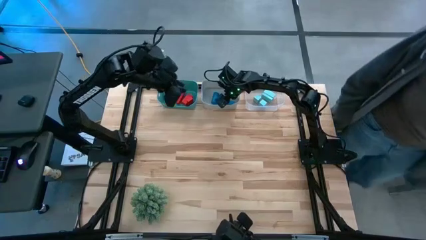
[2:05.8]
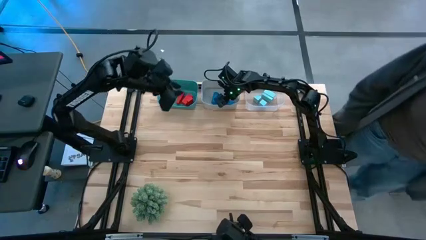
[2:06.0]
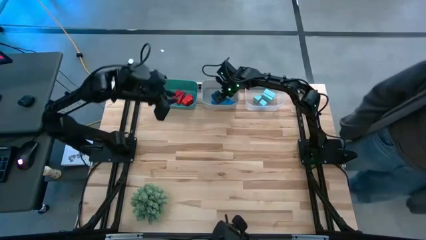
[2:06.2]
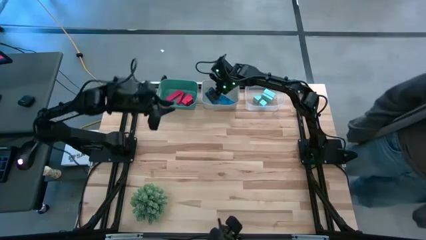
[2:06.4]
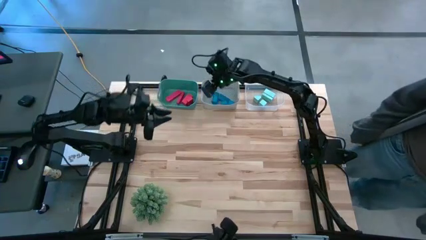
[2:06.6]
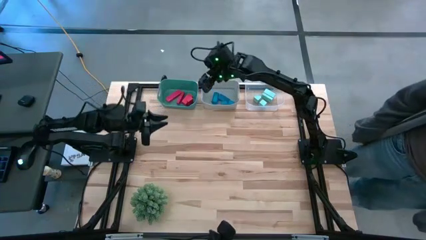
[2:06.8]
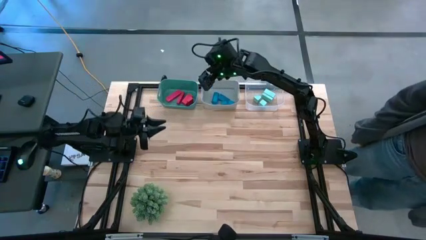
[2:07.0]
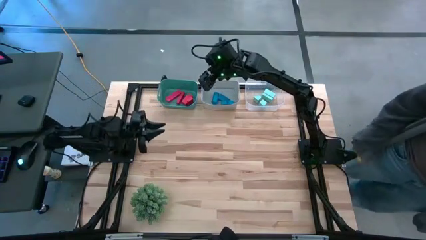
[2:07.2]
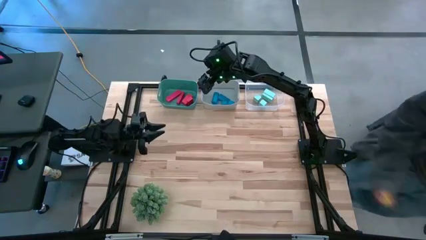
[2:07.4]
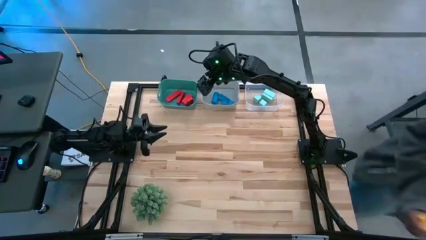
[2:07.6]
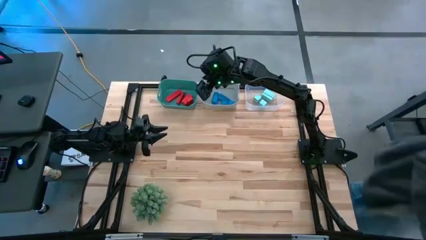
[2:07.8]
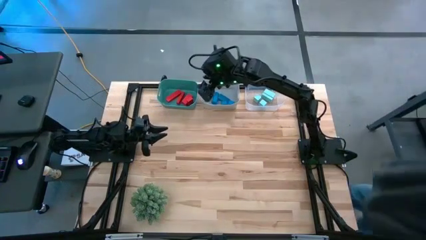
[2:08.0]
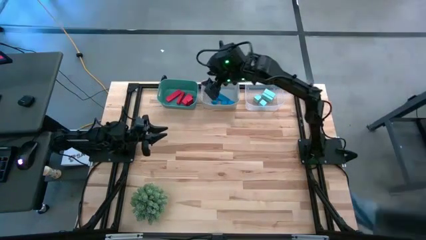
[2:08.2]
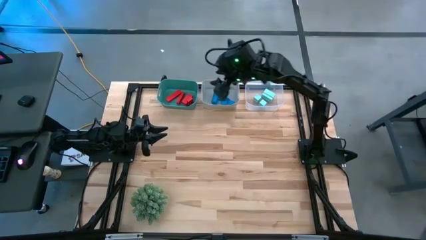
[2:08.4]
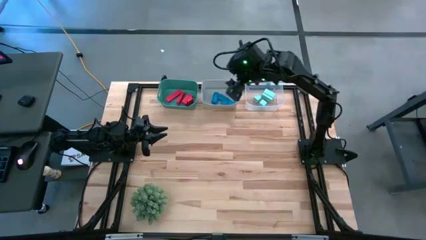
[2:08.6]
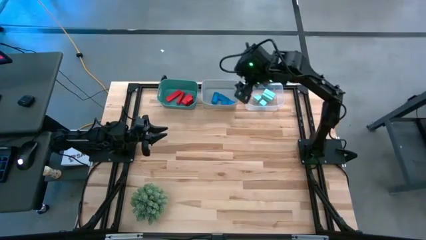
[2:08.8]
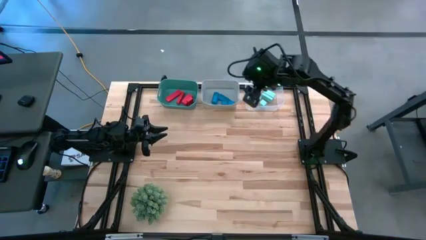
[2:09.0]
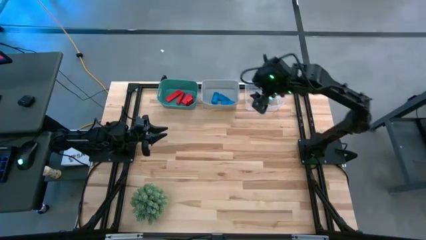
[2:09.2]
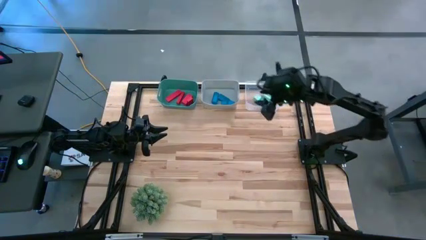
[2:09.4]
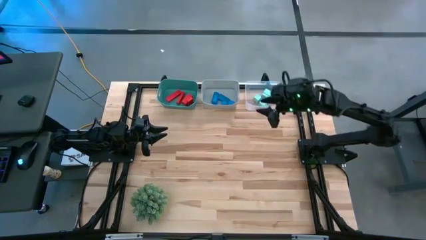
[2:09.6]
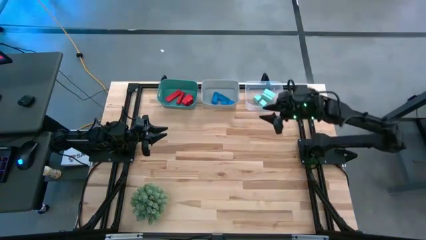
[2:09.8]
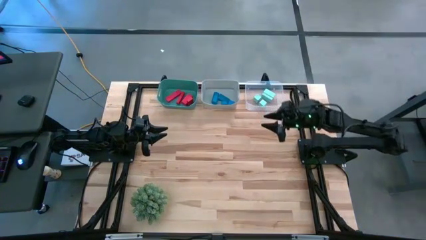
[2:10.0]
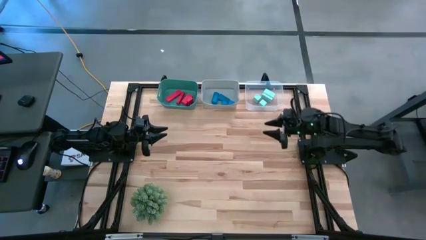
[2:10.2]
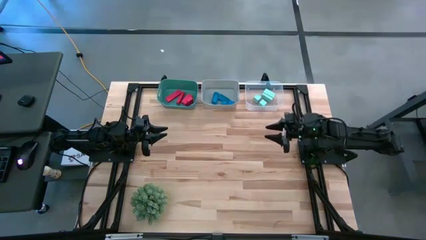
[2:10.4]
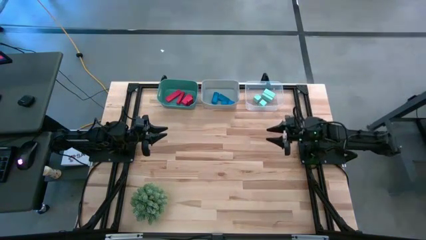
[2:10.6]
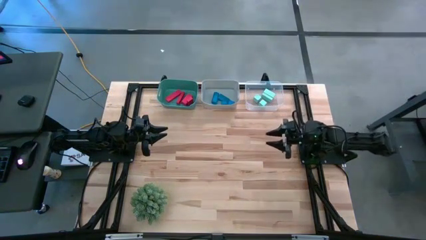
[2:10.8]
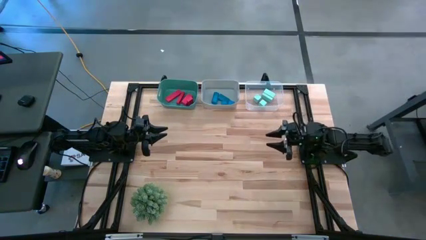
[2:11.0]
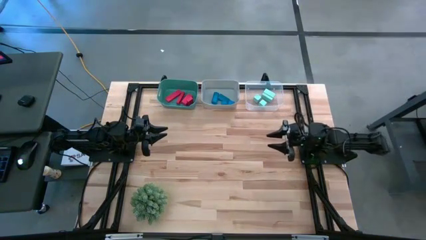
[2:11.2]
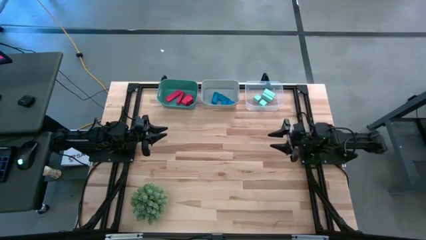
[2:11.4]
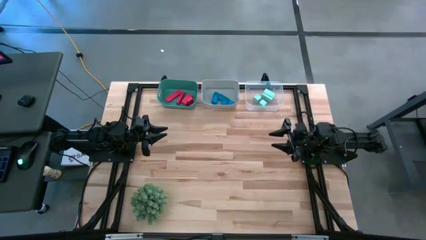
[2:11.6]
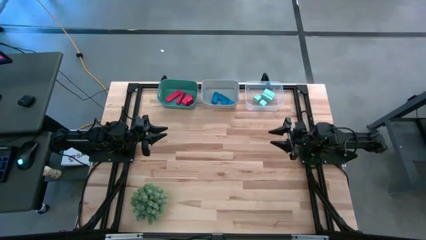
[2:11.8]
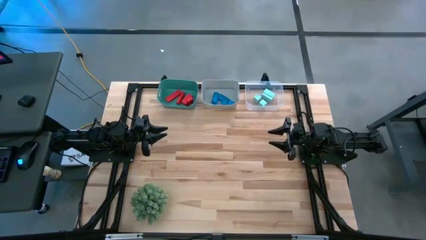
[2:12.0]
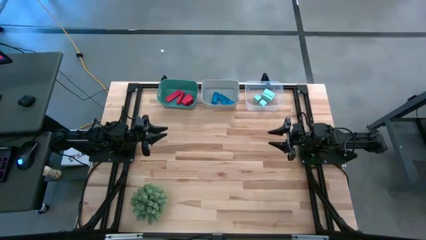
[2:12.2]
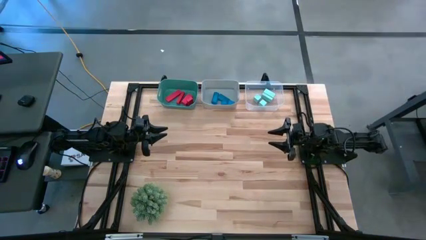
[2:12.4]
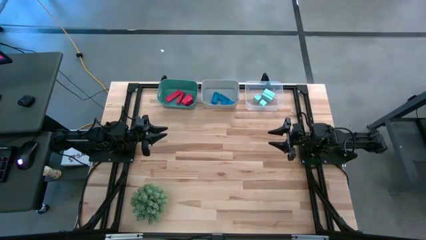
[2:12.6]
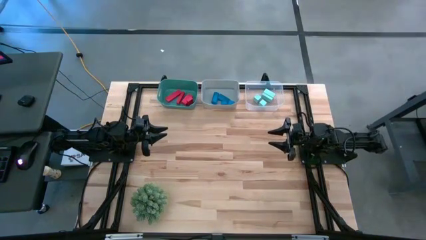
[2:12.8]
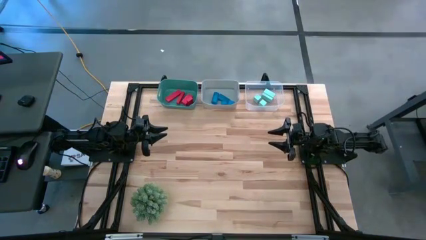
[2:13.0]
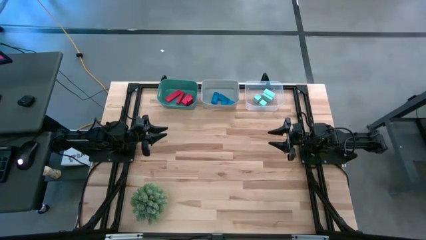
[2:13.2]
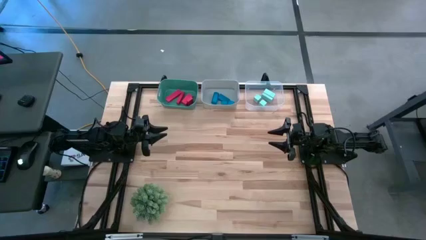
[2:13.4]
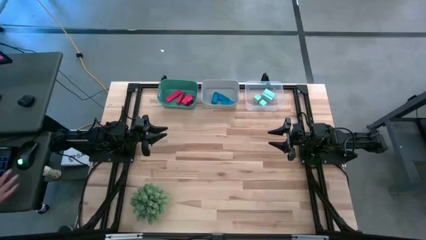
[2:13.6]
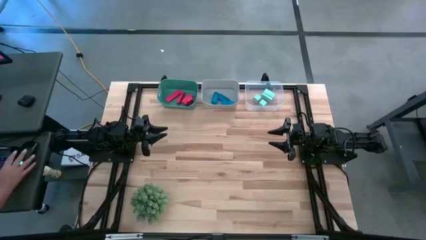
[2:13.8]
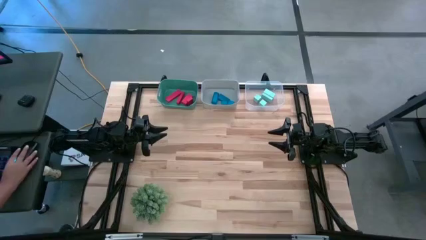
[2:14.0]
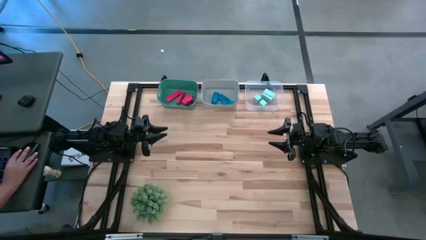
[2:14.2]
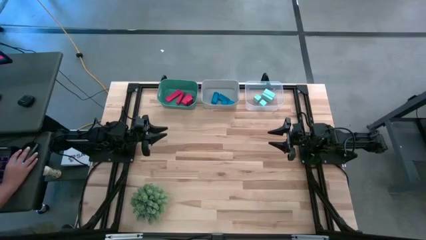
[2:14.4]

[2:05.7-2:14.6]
Task: Sort & place blocks by color
Return to Home Position

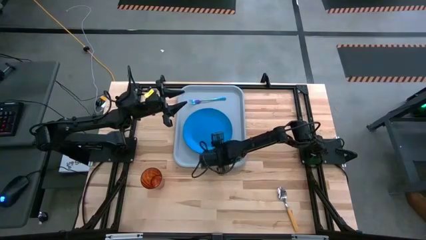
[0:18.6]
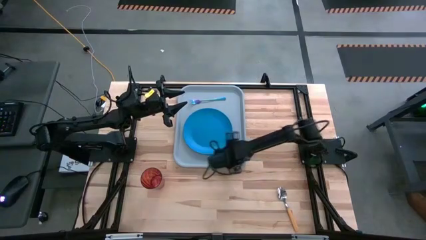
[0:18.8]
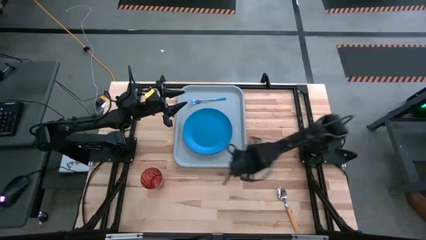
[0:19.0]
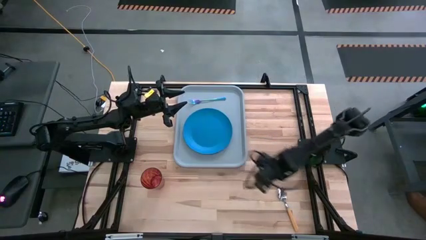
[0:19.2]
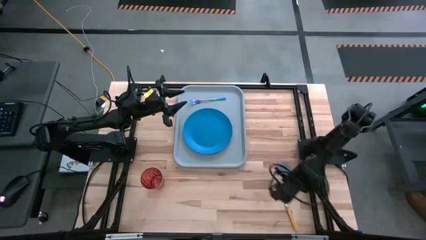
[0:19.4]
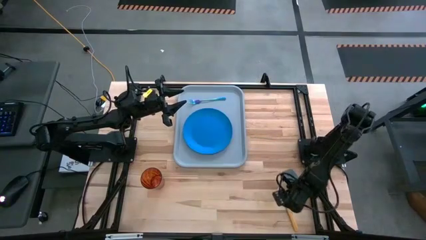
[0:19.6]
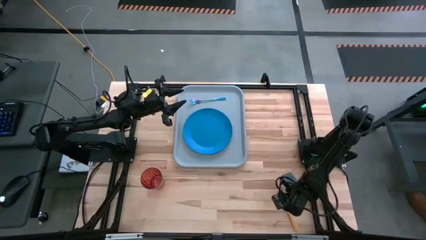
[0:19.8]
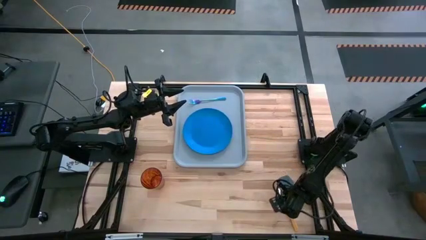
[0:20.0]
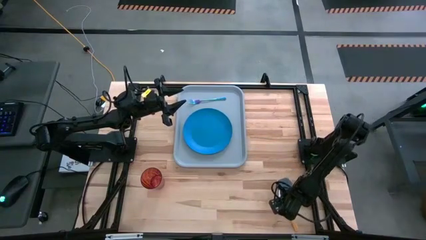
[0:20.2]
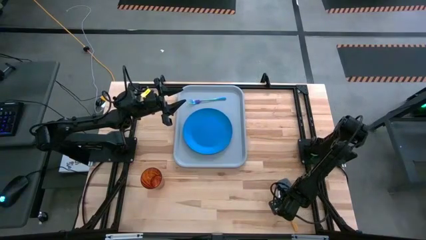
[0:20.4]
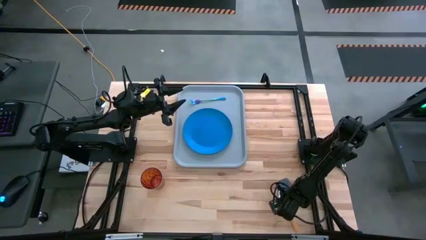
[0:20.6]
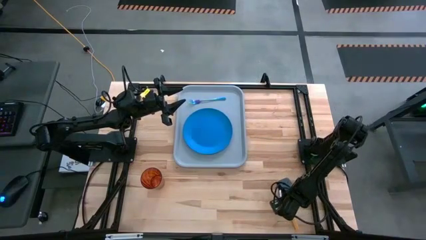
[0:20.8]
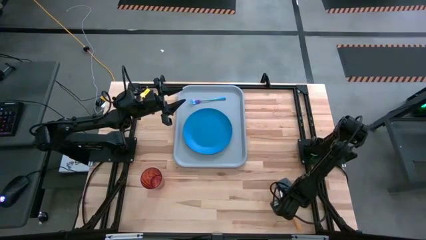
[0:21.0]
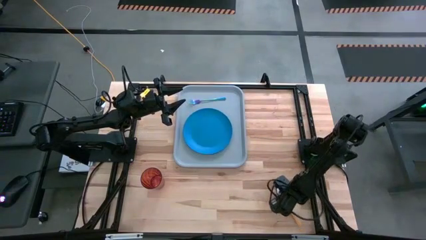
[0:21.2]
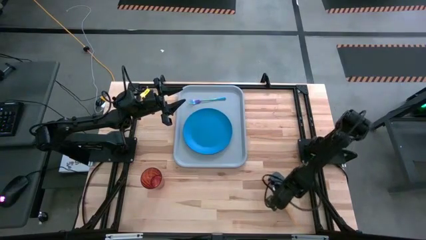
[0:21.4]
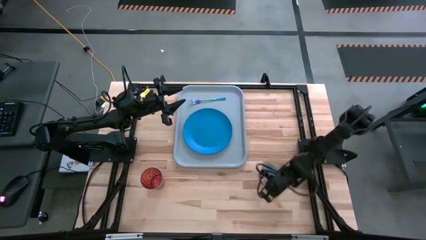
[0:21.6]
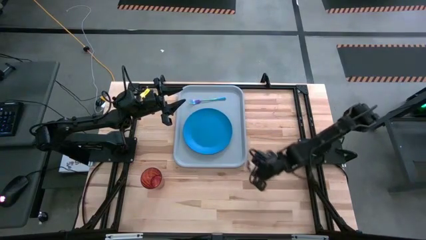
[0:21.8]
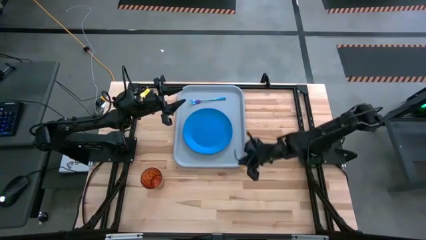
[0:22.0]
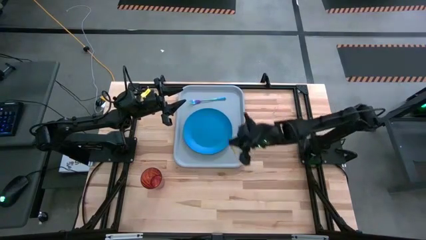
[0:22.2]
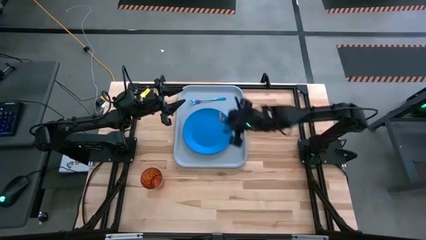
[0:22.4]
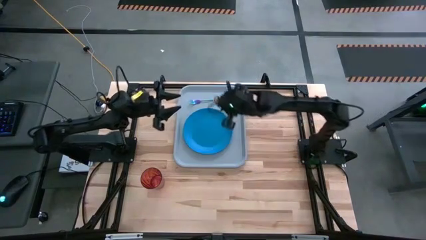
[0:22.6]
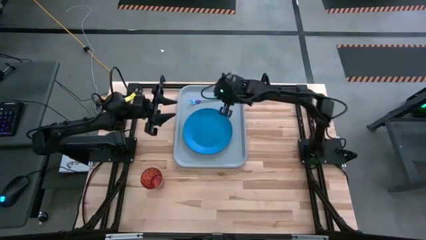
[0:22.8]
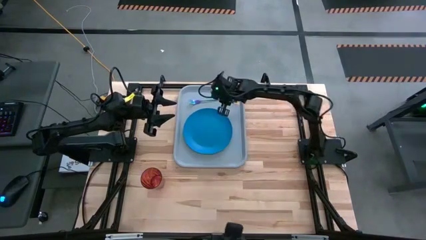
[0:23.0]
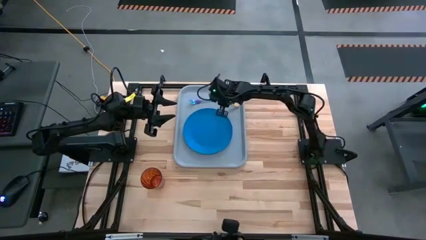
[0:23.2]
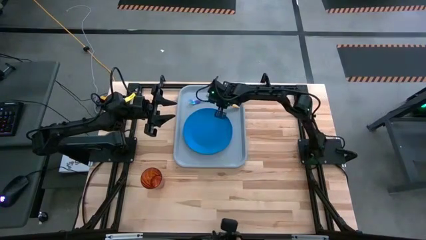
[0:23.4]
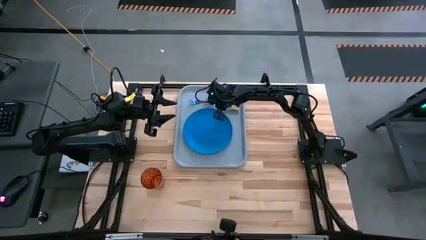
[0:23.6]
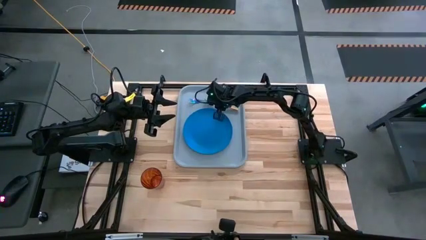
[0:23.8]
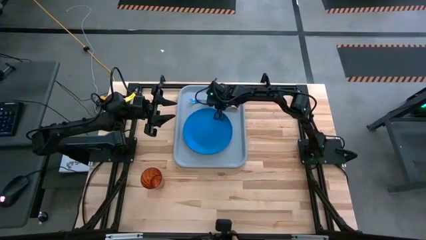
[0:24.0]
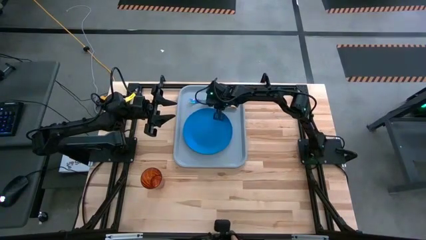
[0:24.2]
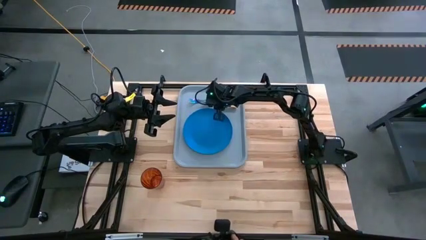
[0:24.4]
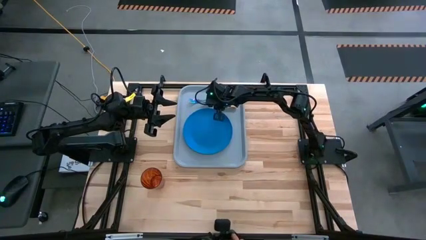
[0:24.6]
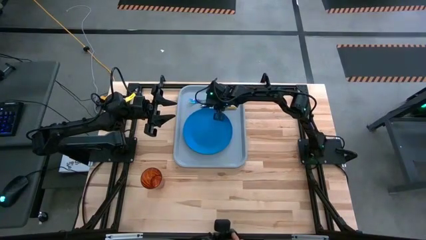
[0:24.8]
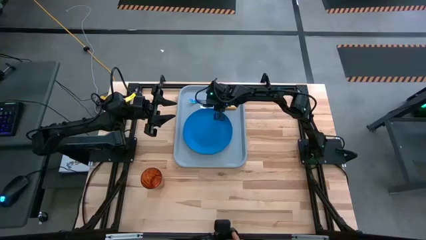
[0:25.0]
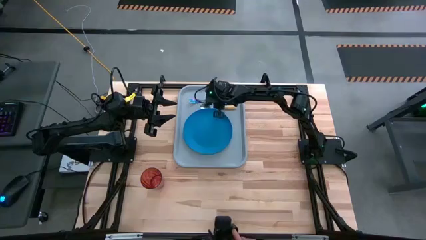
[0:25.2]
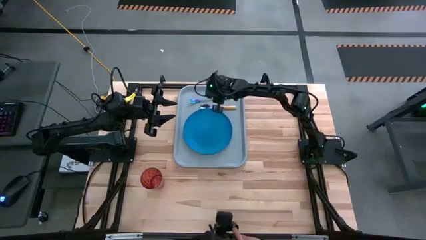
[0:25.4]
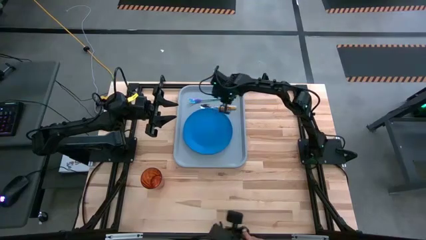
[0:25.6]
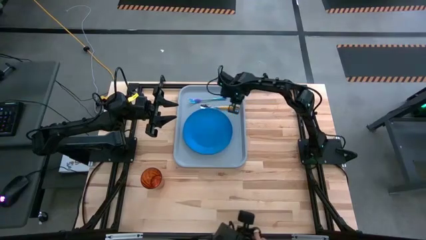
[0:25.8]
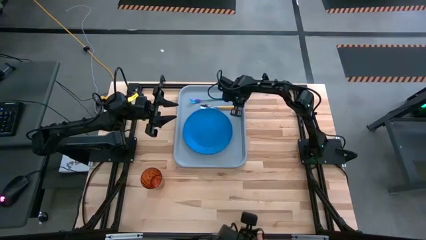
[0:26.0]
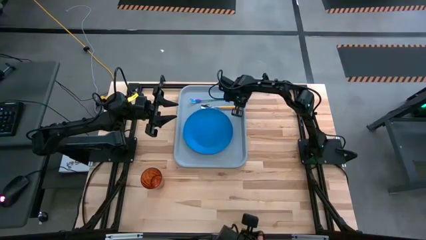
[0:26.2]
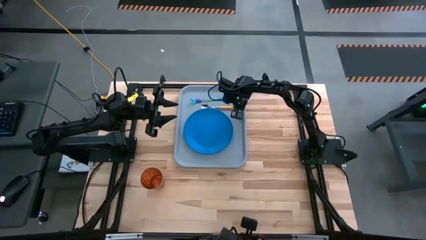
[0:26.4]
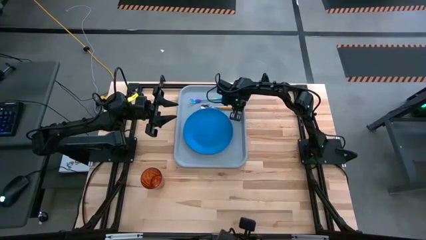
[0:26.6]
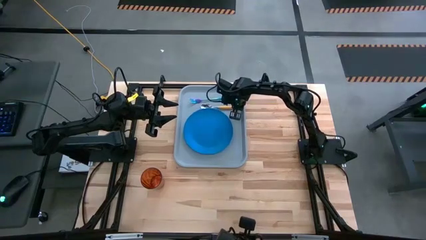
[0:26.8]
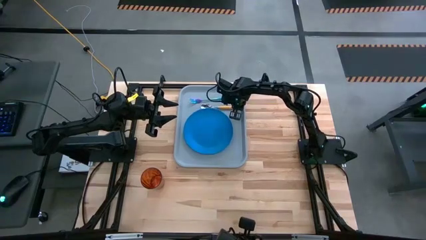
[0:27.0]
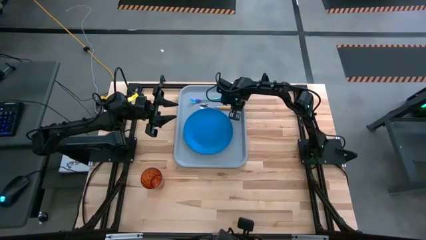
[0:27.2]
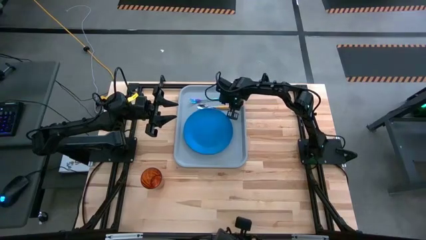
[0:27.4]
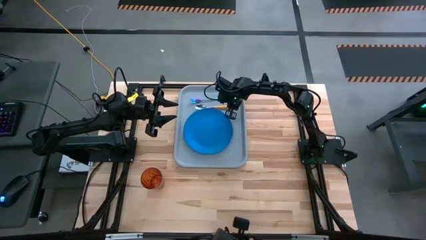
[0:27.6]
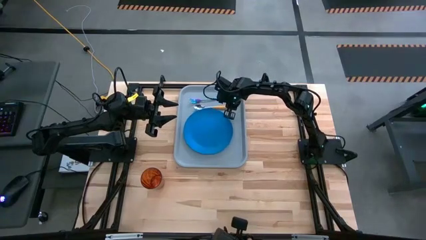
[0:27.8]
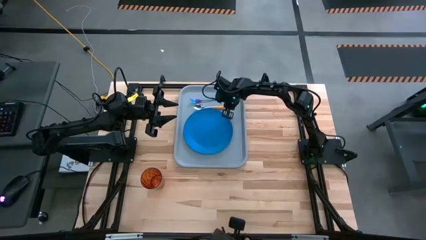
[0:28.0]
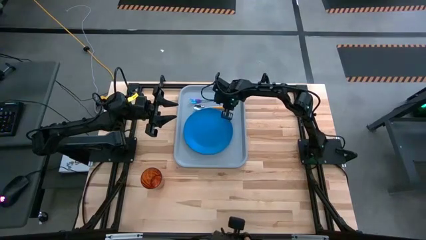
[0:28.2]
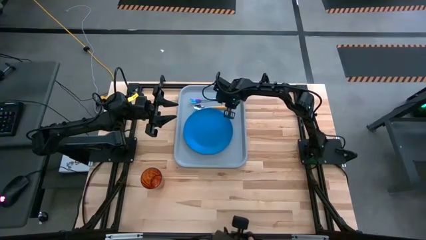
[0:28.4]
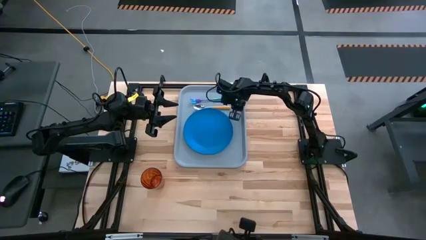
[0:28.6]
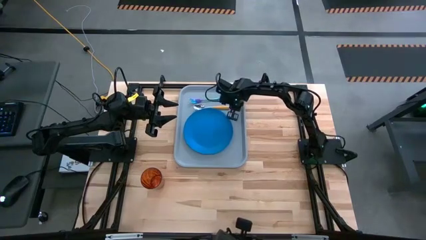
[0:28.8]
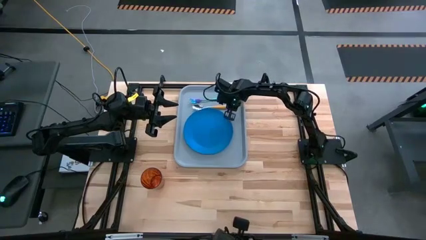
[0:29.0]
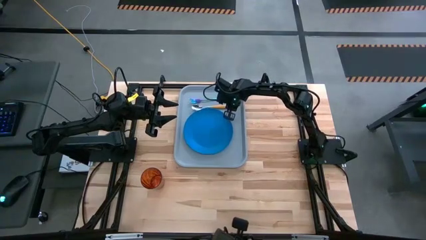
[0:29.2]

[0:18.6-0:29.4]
Task: Pick and place plate/cup/fork/spoon on tray
Put the yellow spoon on the gray serving tray to the left of the blue fork
